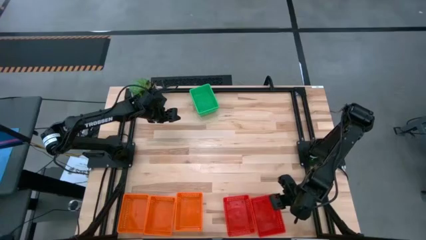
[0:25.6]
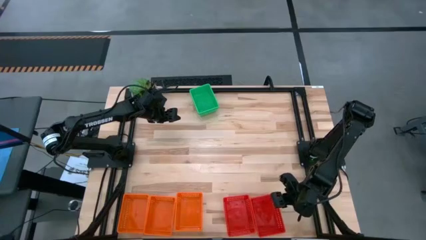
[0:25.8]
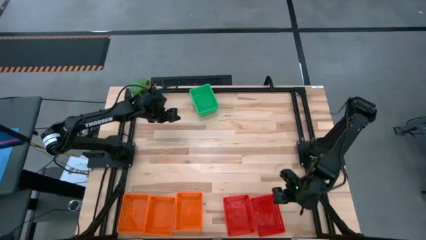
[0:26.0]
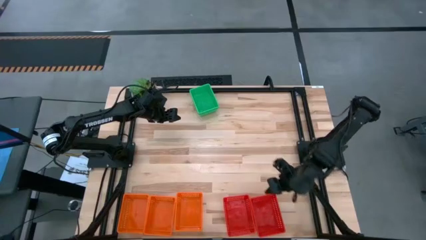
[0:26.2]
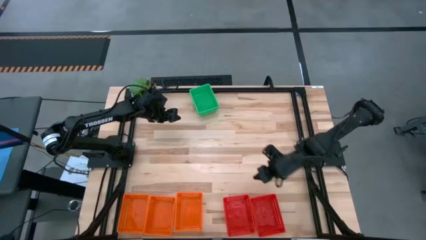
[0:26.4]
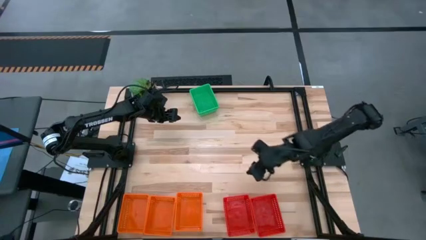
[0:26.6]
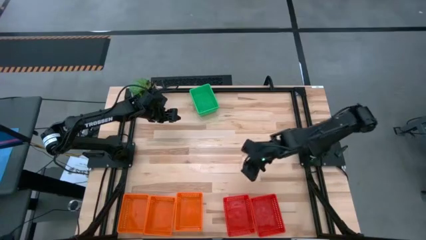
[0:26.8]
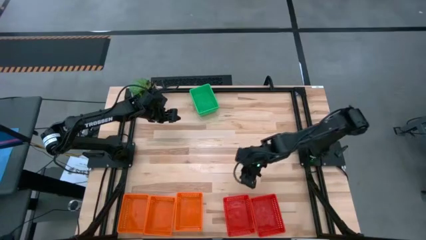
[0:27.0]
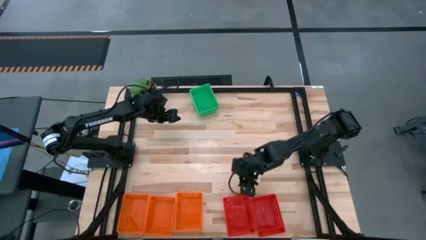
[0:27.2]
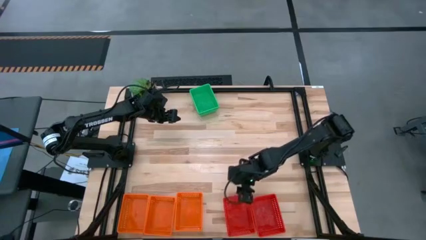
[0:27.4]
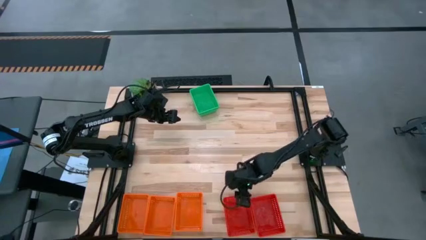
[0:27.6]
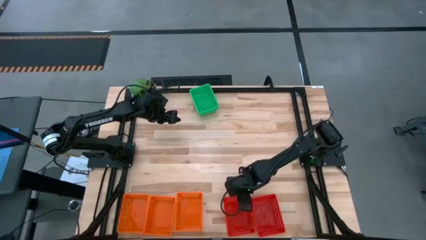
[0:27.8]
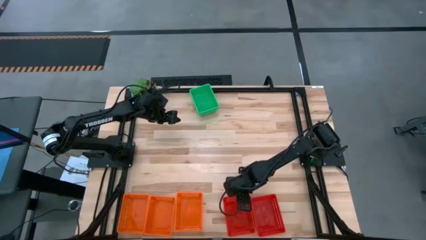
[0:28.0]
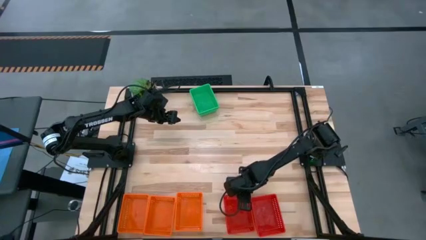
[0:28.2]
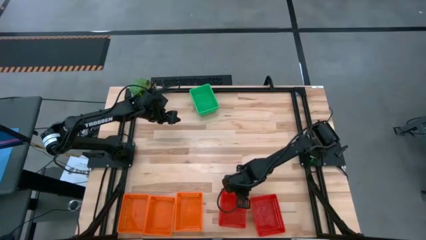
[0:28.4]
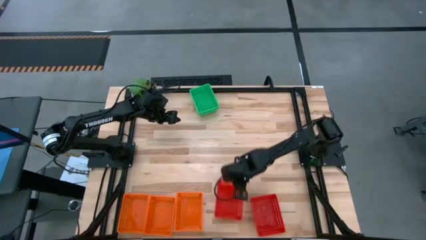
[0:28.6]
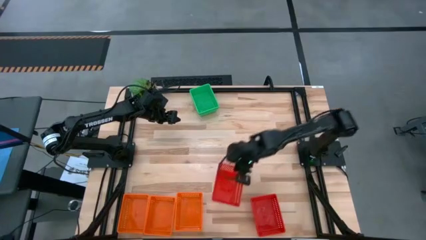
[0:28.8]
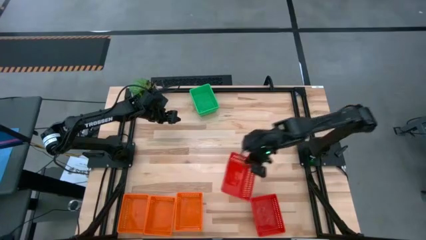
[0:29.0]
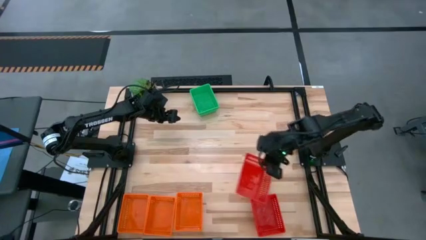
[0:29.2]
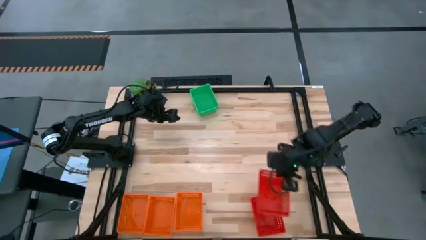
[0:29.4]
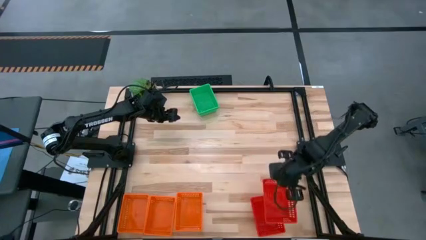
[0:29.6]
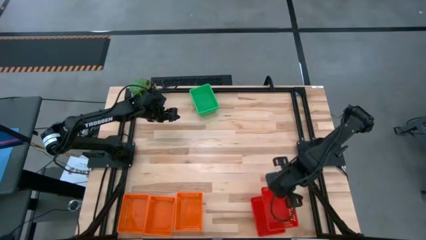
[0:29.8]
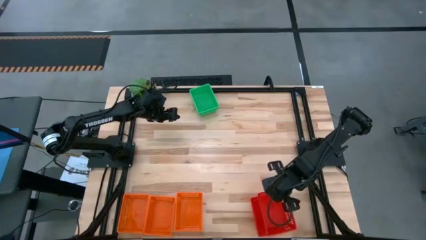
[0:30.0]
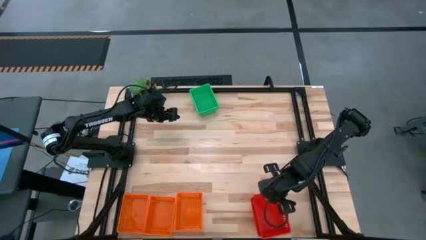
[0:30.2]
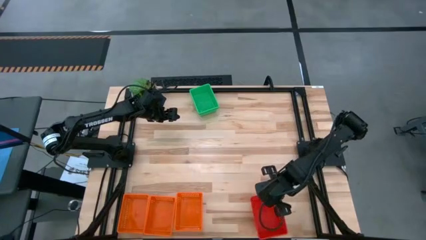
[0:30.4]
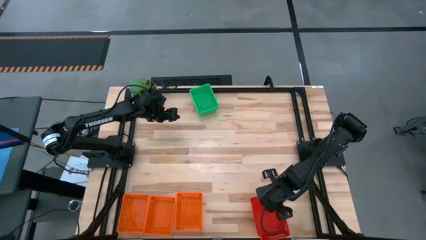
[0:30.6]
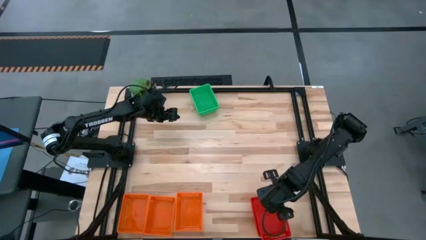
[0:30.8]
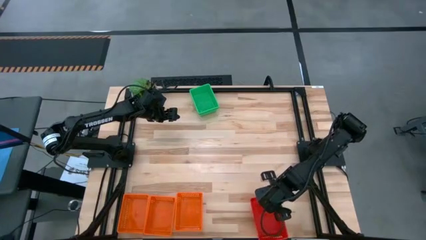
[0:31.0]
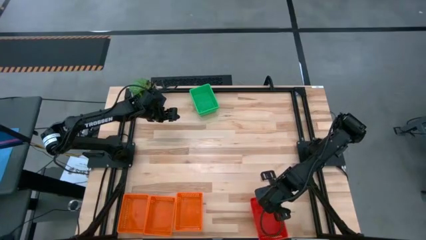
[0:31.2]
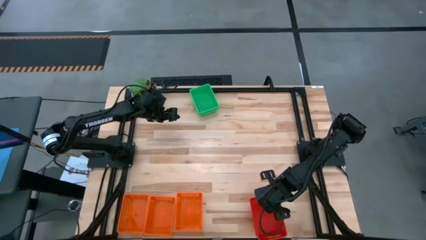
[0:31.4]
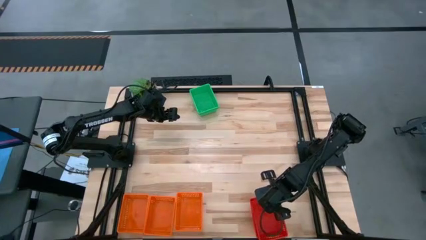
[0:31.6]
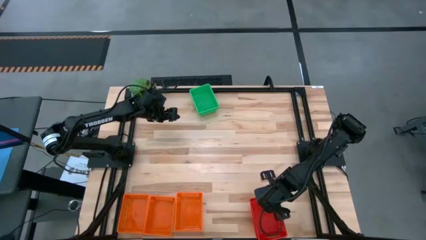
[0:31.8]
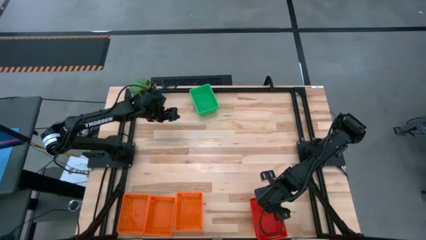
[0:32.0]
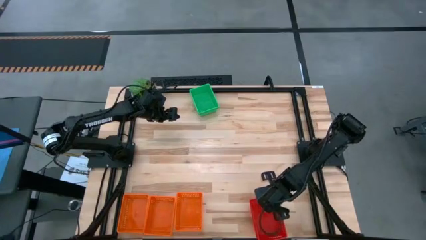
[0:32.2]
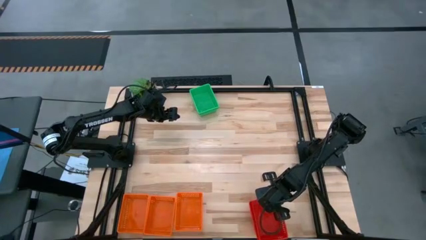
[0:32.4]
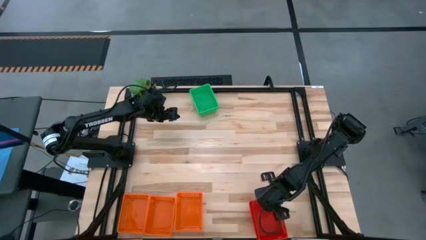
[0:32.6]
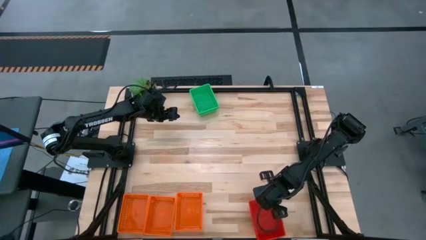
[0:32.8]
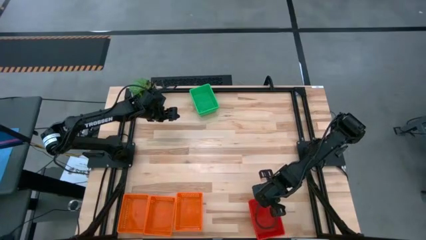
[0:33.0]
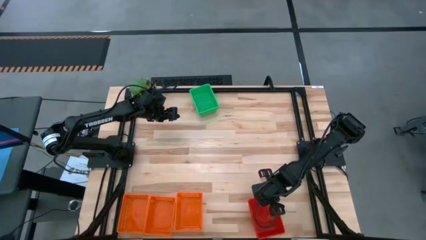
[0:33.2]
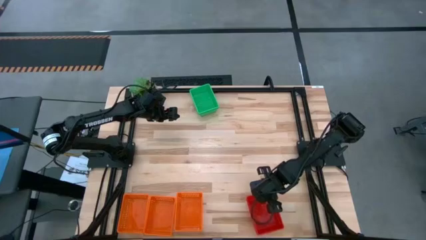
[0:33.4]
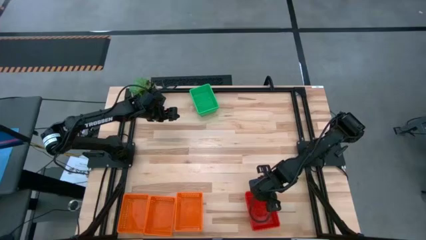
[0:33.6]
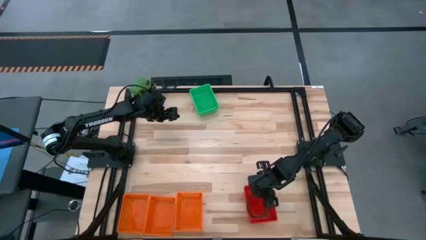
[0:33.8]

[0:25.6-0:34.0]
Stack the left red bin on the red bins

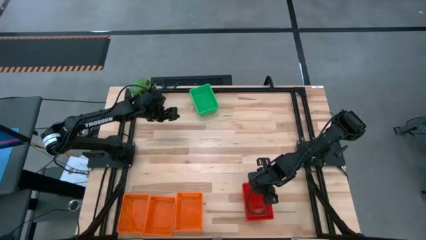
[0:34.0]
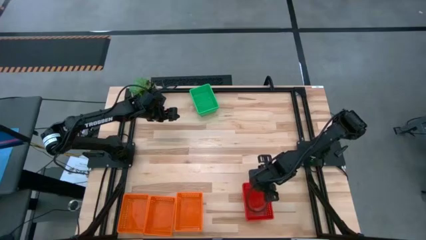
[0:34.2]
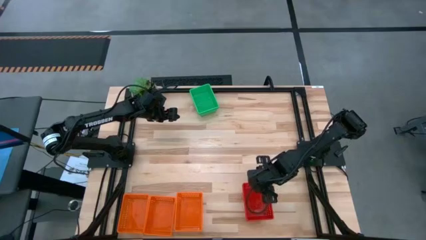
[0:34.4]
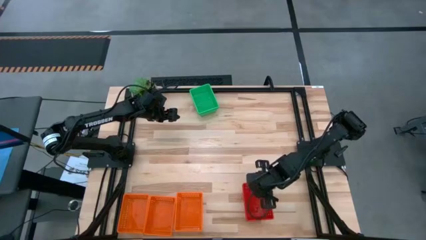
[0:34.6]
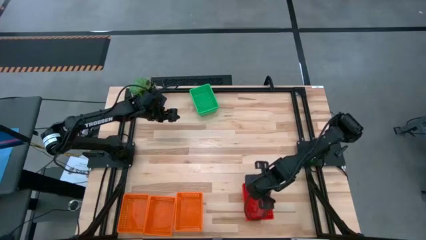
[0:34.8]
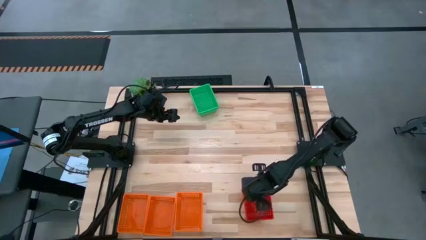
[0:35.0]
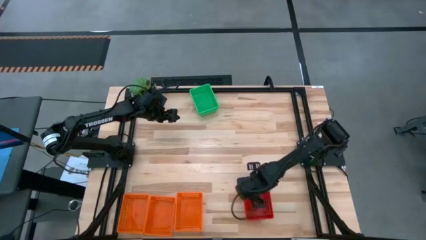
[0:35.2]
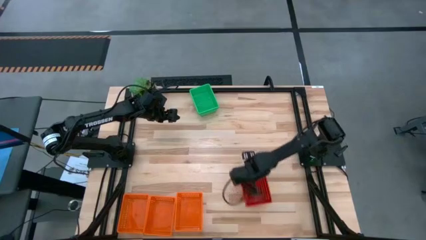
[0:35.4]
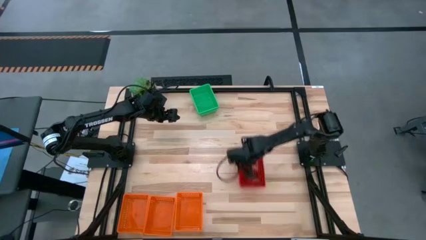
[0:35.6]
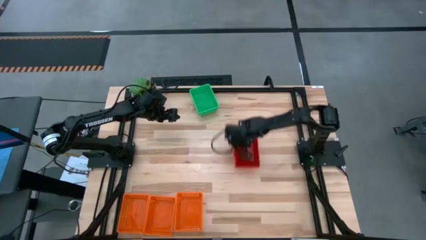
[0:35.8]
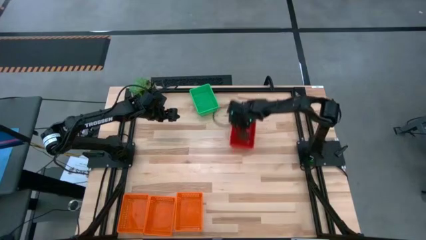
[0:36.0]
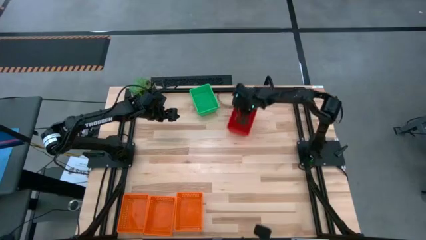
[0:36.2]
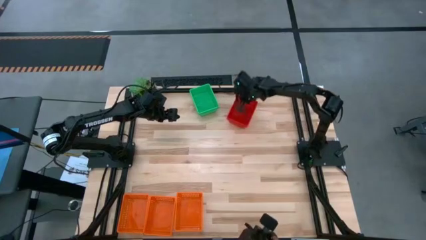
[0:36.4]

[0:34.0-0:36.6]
Move the stacked red bins to the top center of the table

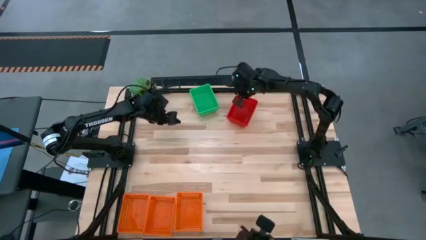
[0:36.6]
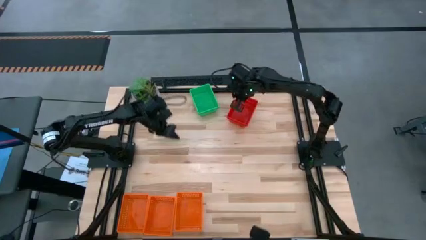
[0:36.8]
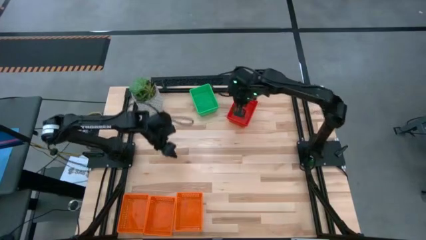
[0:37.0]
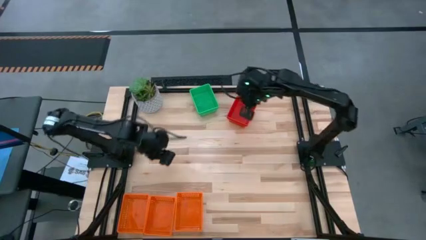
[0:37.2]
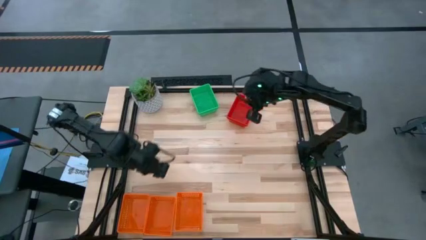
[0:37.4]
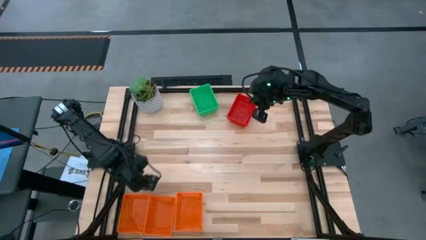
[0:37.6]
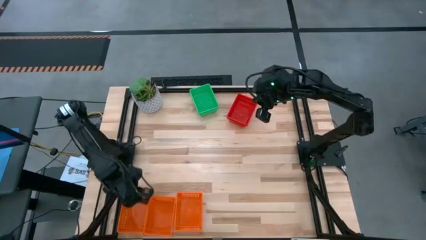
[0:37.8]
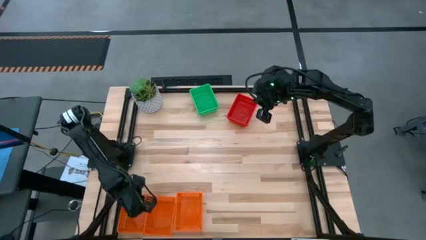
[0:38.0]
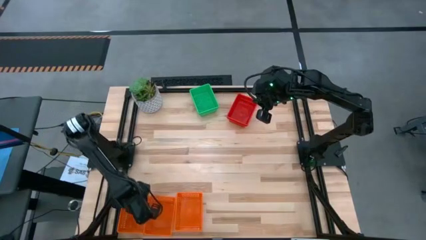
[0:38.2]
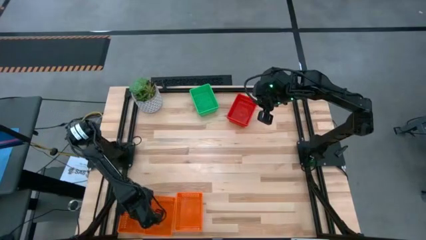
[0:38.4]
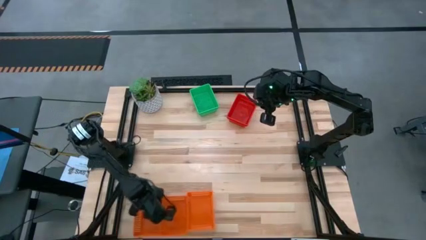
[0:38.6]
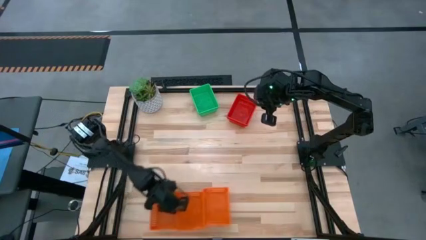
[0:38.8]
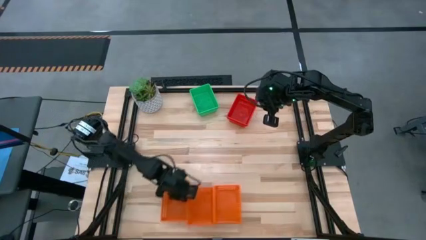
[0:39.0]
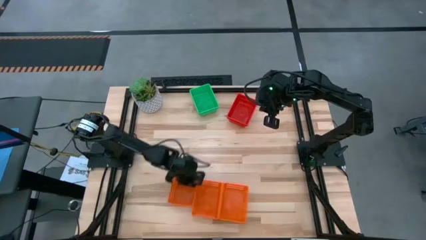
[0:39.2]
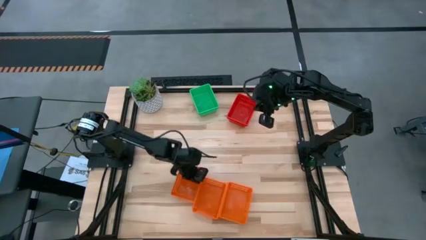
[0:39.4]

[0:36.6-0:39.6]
Move the orange bins to the bottom center of the table

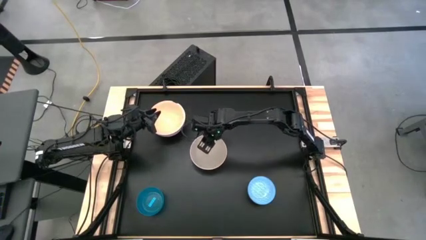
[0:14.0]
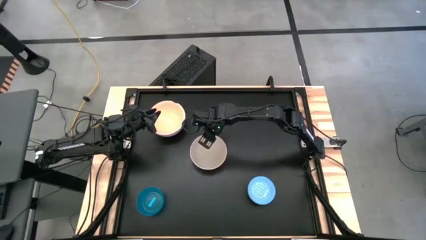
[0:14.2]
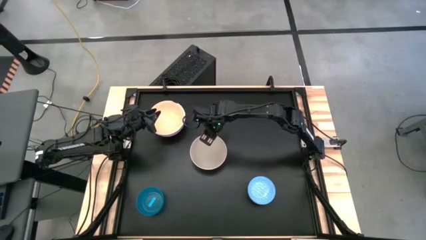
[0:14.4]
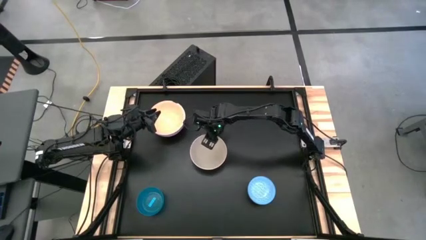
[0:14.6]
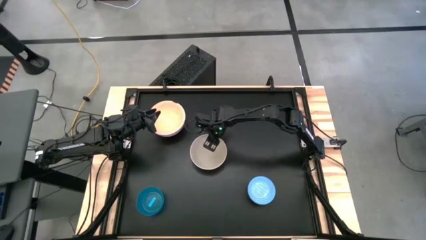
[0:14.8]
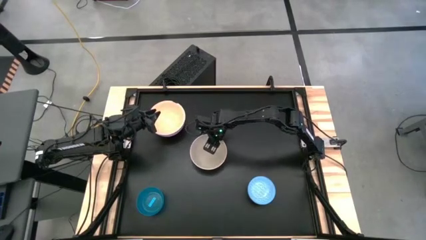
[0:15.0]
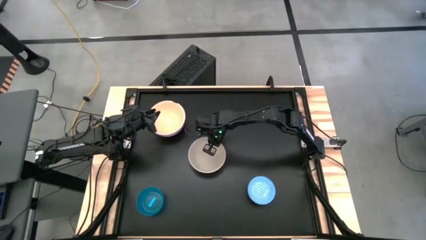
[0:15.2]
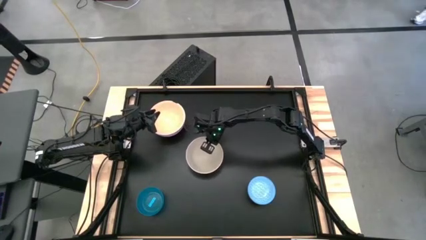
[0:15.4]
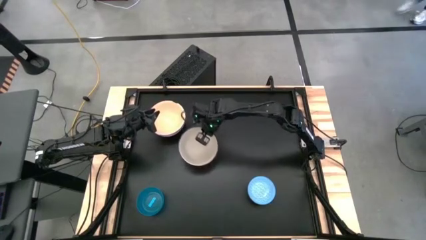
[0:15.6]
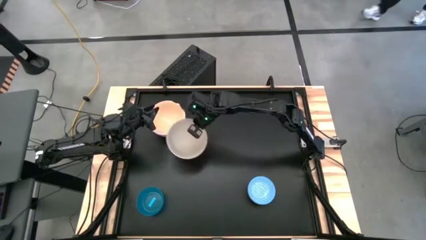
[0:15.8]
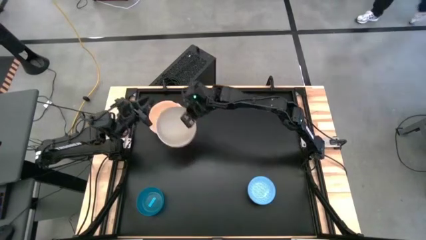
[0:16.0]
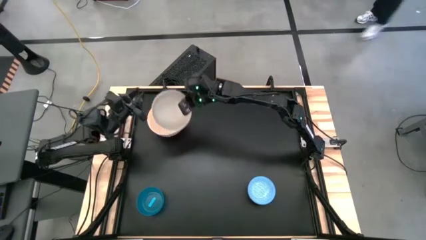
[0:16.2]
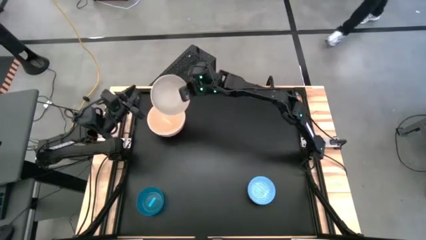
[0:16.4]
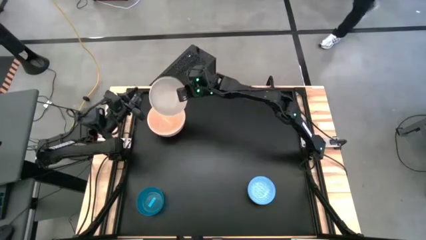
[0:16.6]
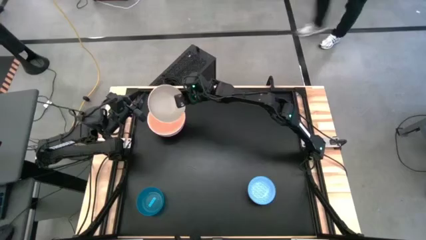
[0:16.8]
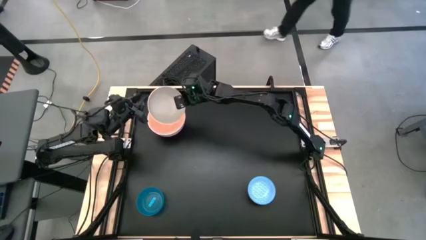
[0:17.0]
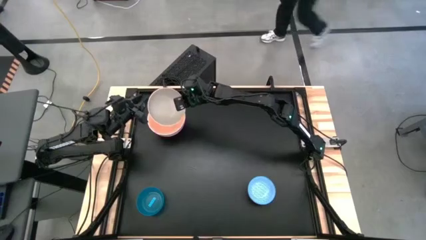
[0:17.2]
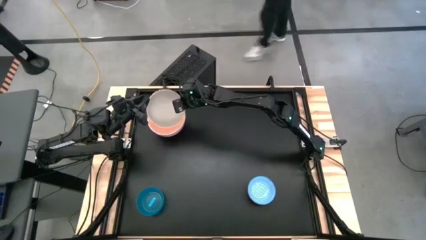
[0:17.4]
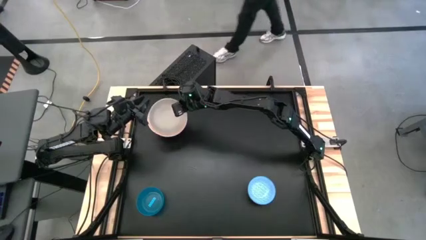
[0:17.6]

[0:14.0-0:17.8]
Stack the gray bowl on the orange bowl
